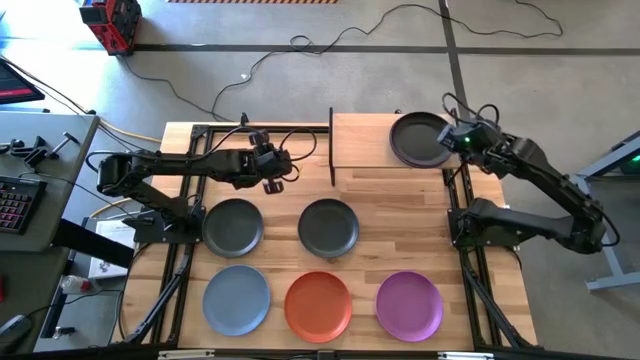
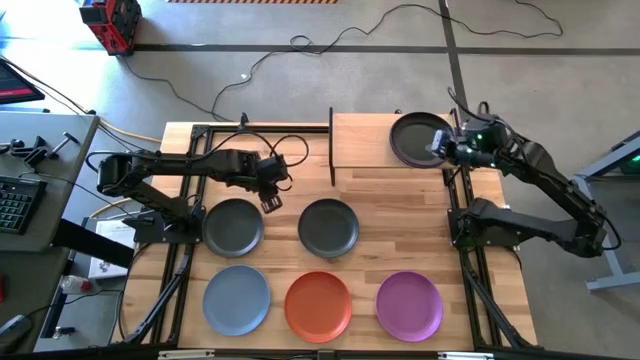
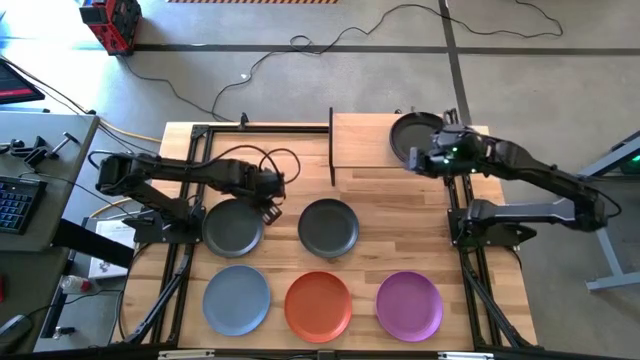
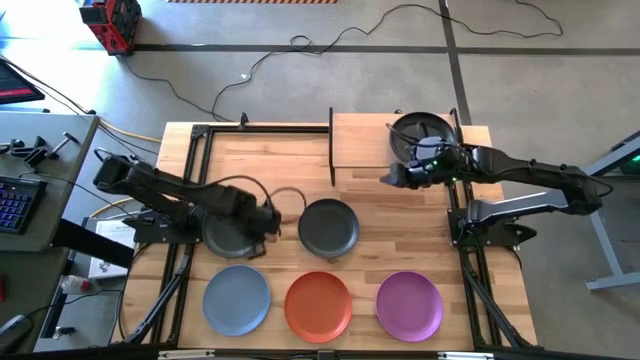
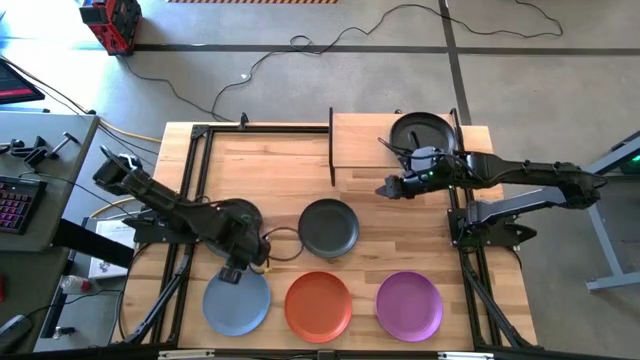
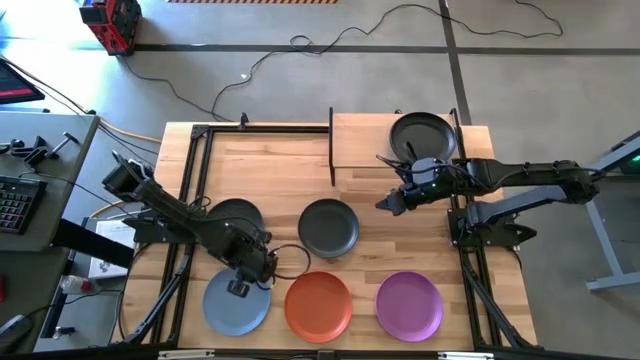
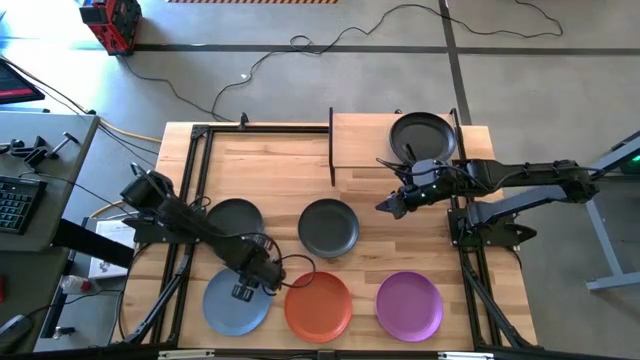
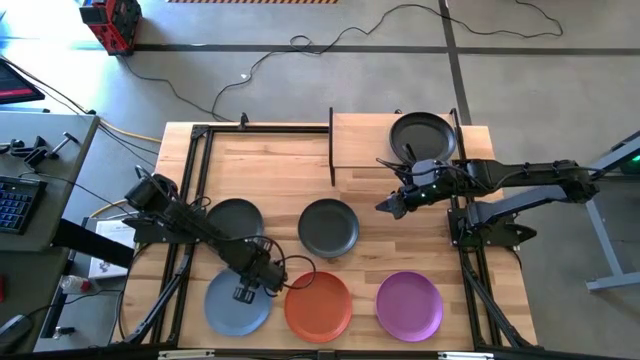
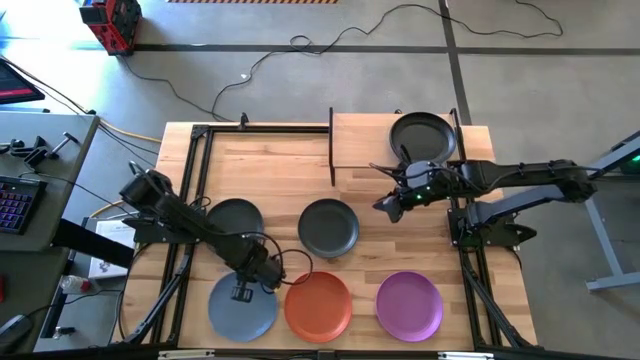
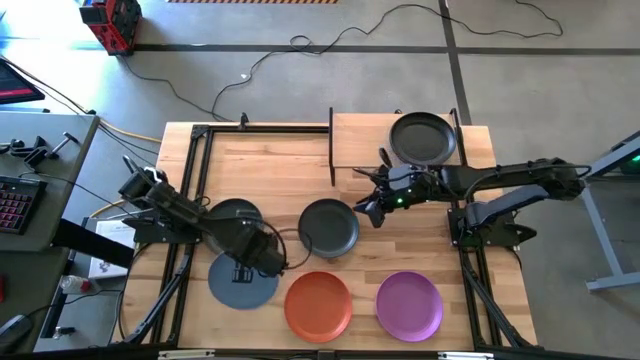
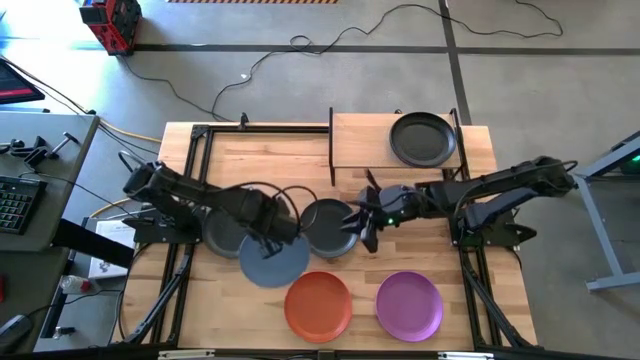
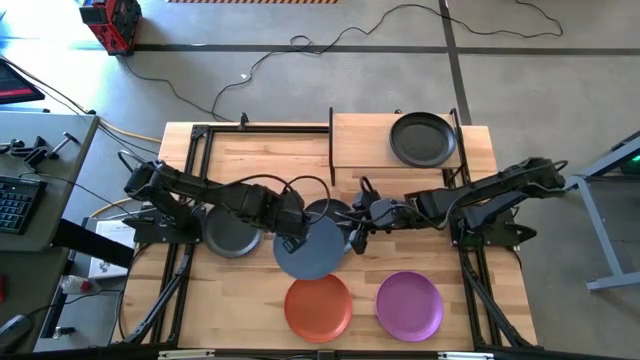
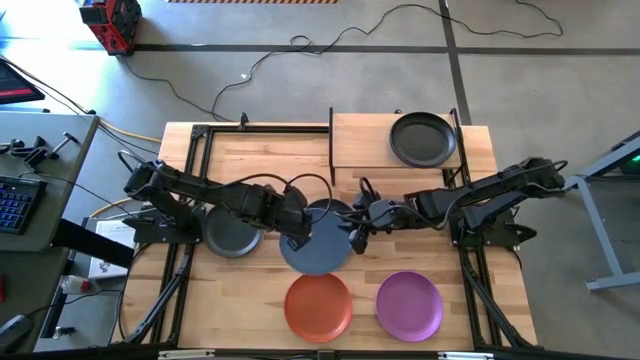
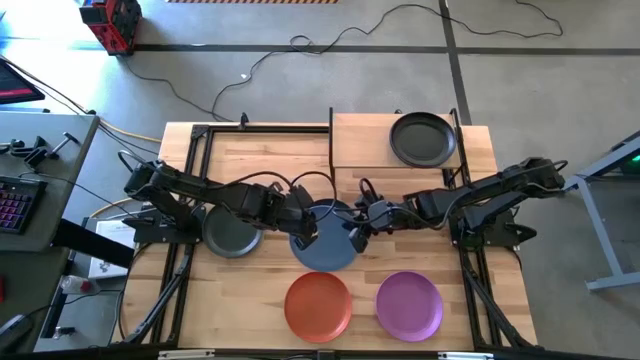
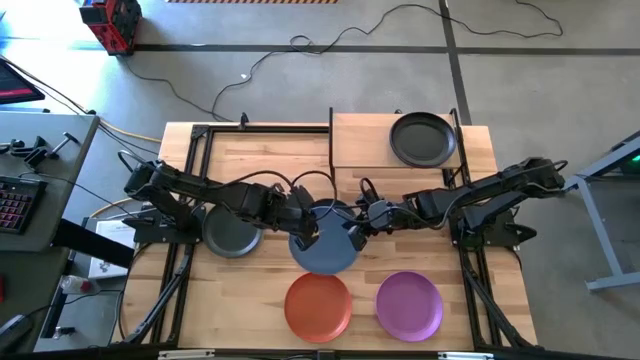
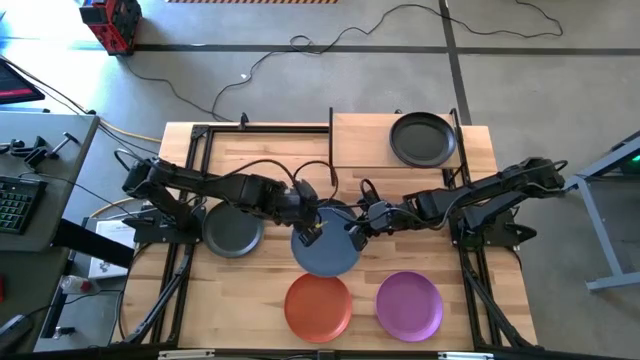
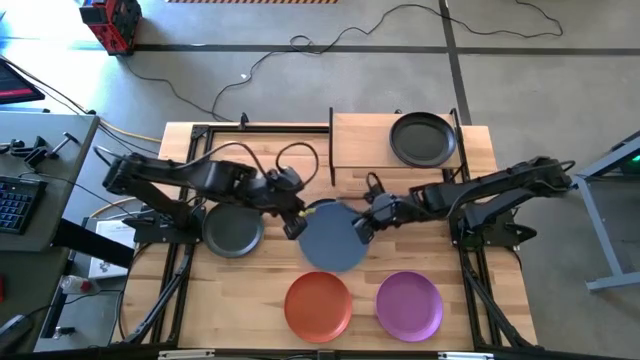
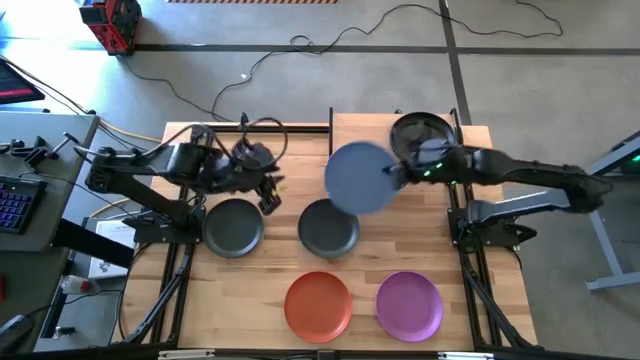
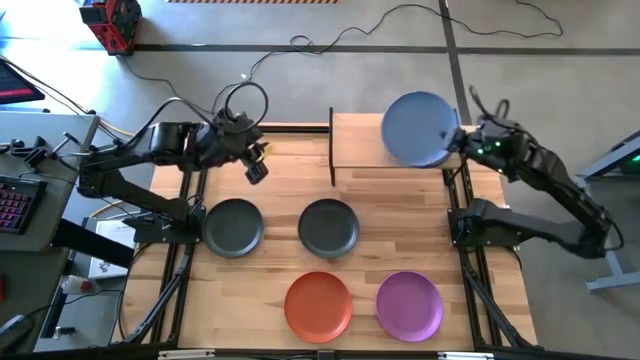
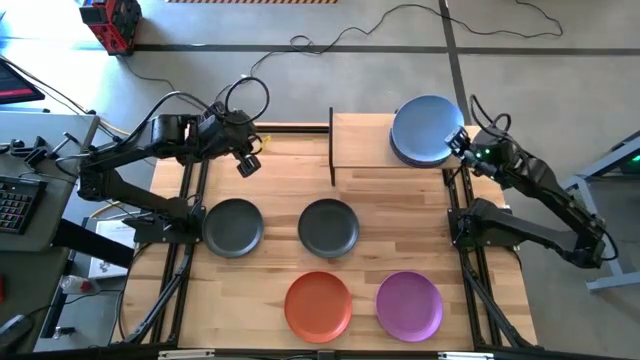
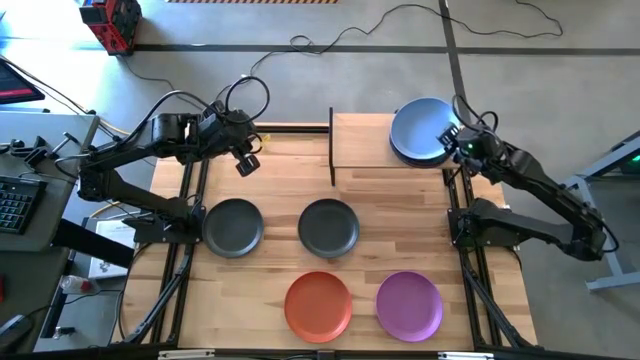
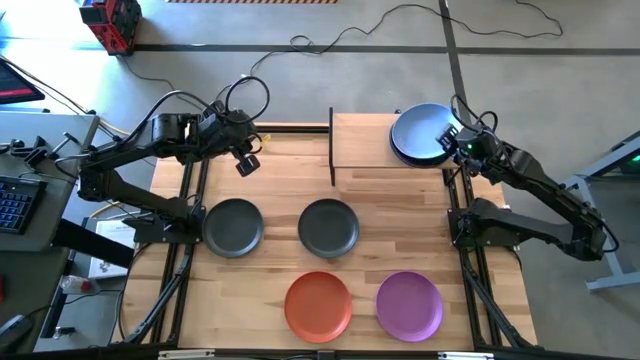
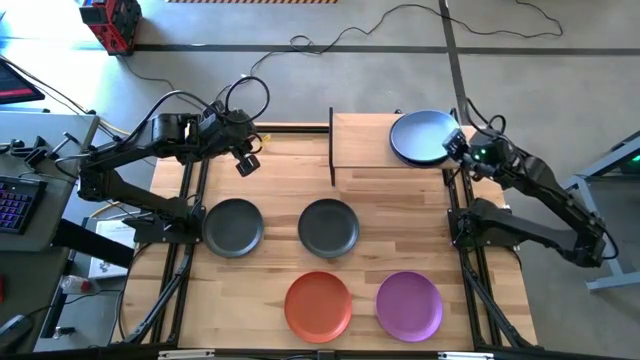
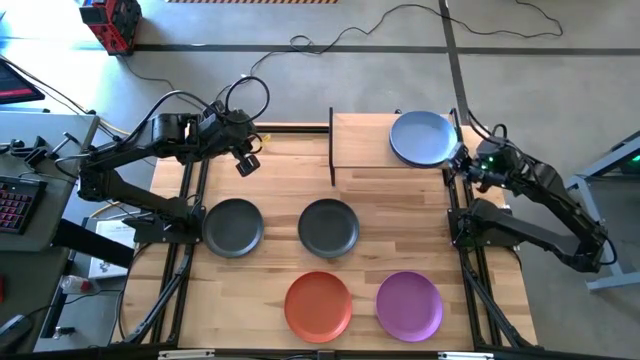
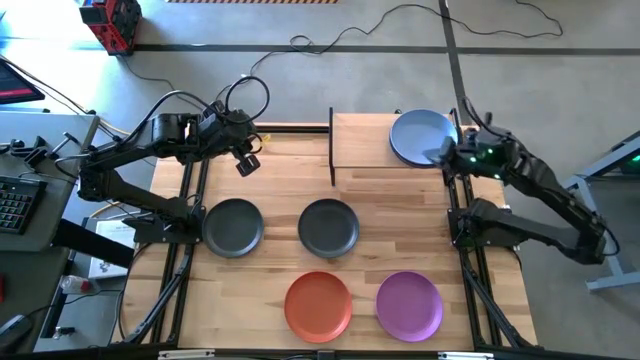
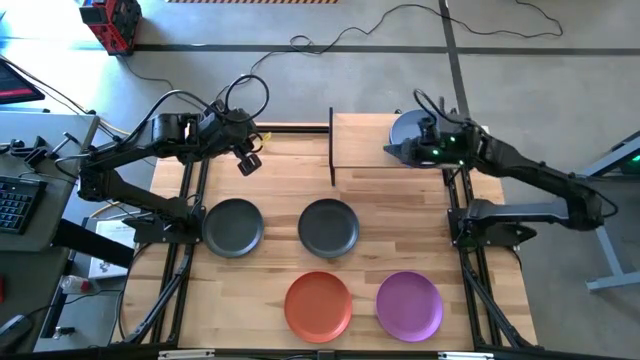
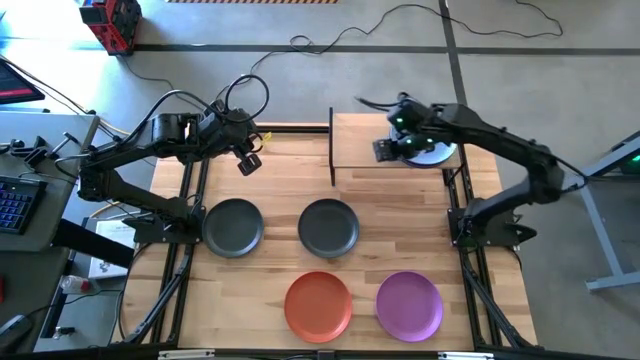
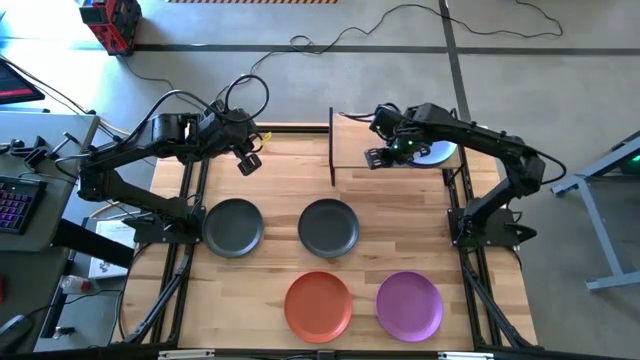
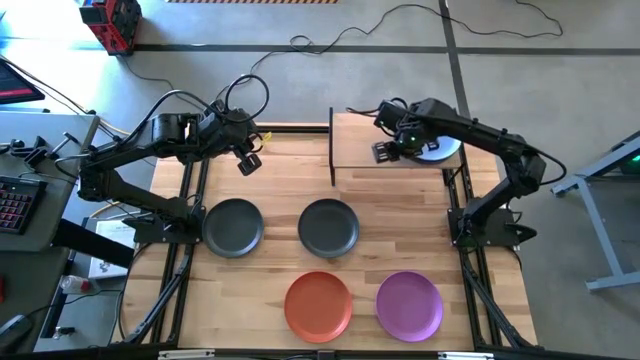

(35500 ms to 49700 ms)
Task: Place and stack plates onto a shelf
Stack the blue plate on top of the black plate on the shelf

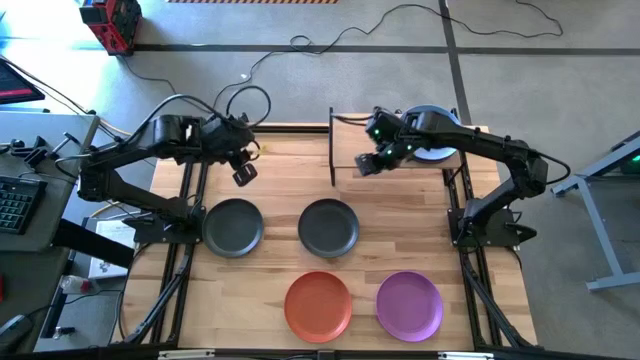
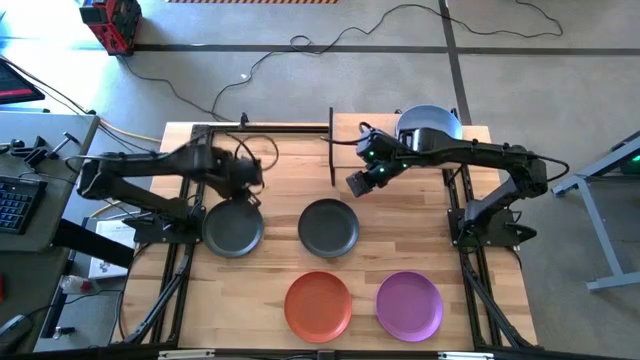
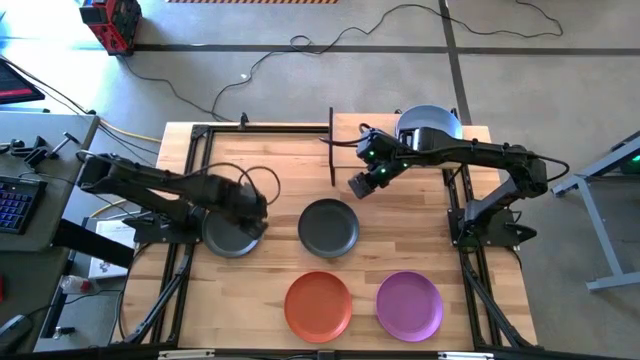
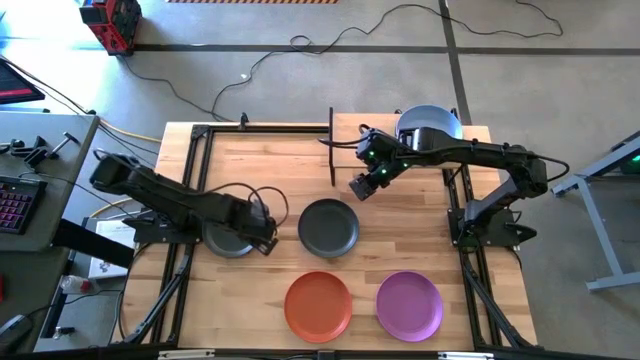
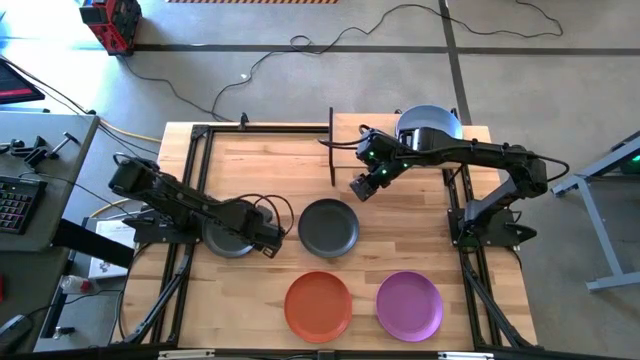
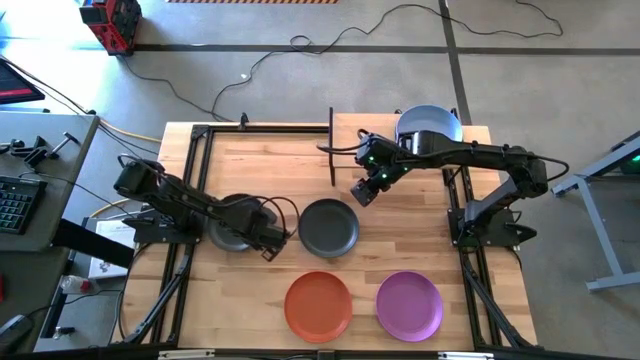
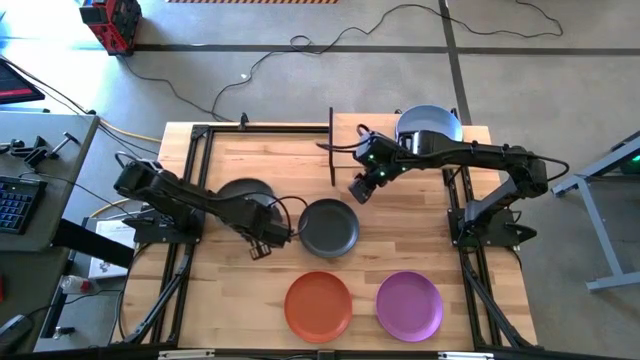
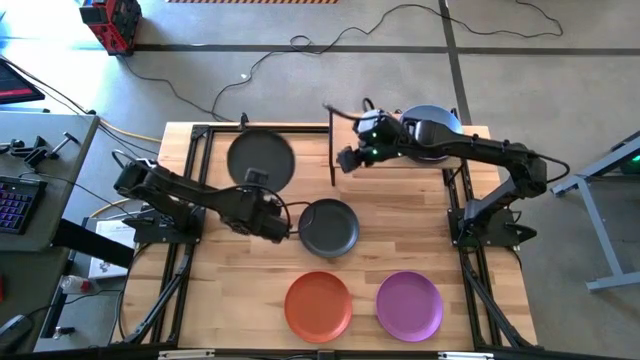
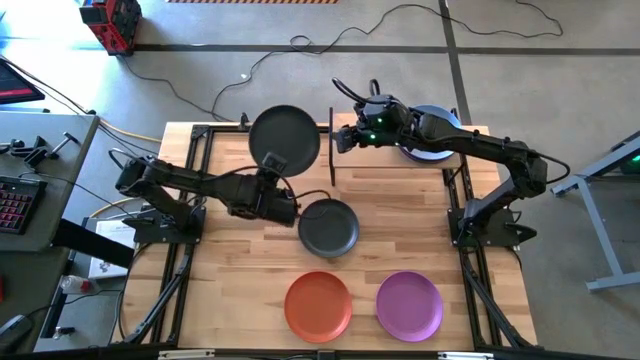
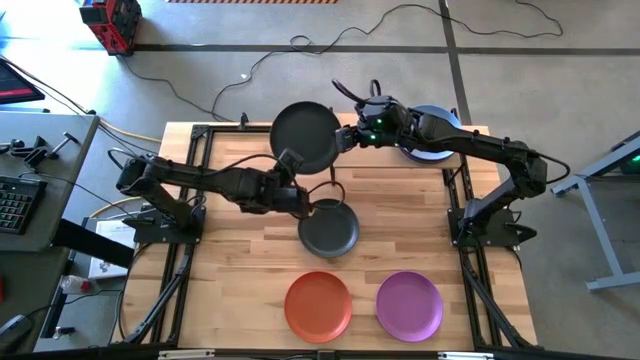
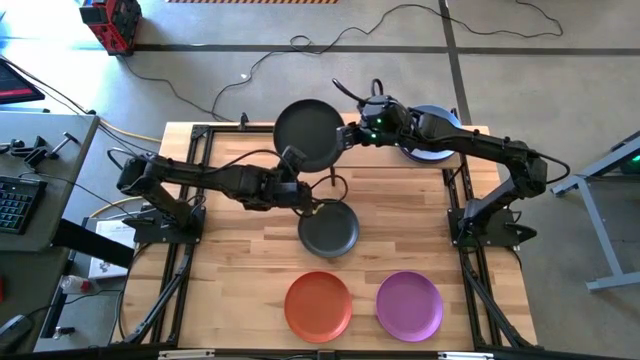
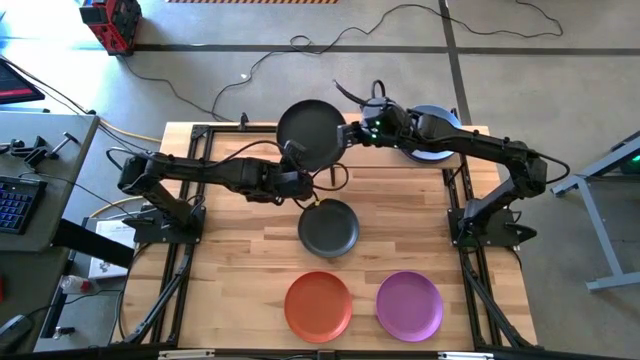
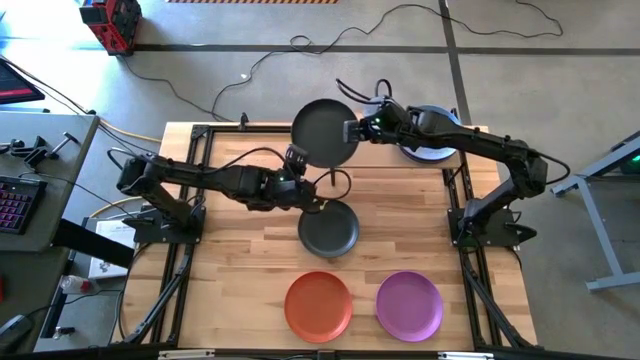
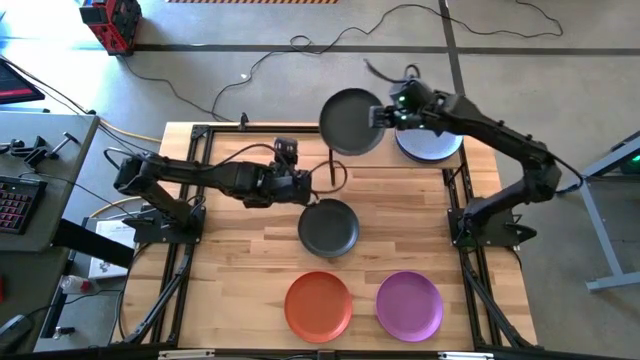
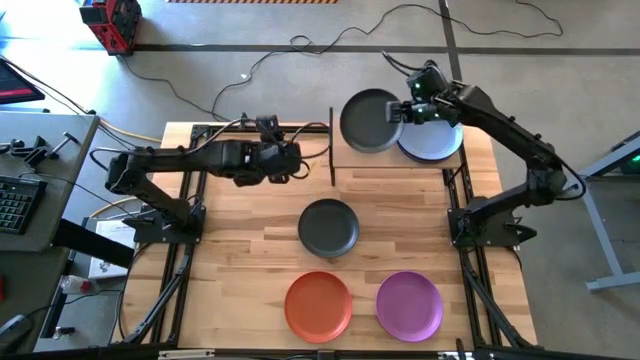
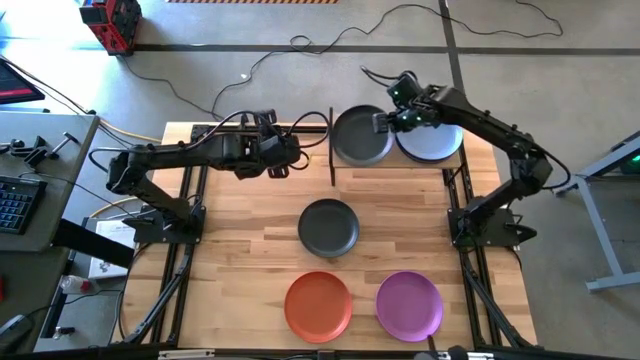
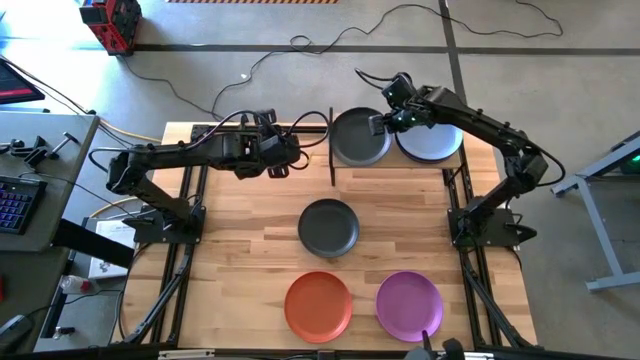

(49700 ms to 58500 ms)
Put the black plate on the shelf

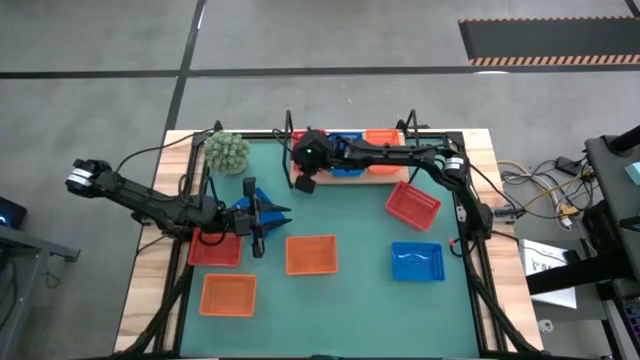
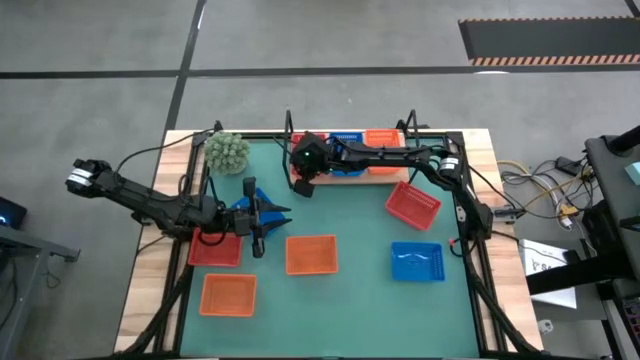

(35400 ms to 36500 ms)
Task: Stack baskets on shelf by color
Adjust the red bin on the shelf
